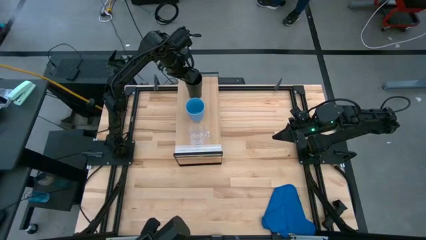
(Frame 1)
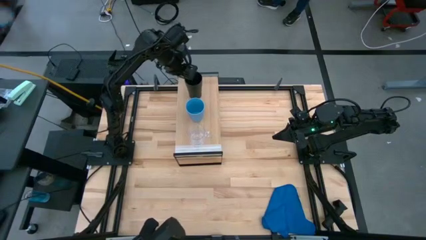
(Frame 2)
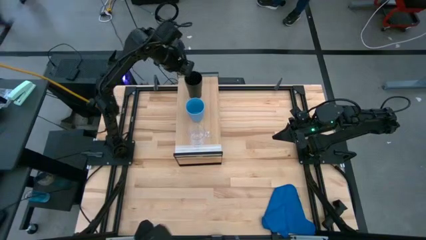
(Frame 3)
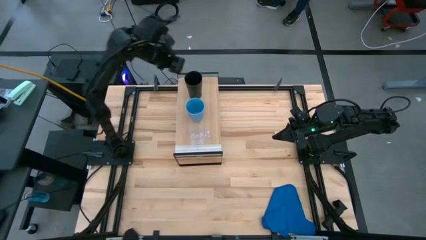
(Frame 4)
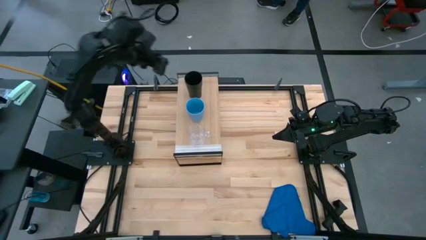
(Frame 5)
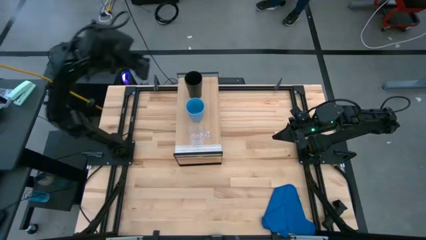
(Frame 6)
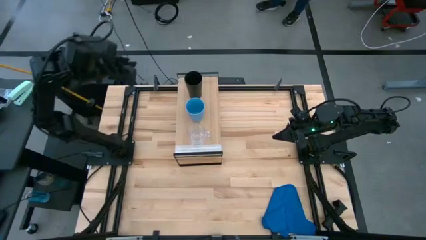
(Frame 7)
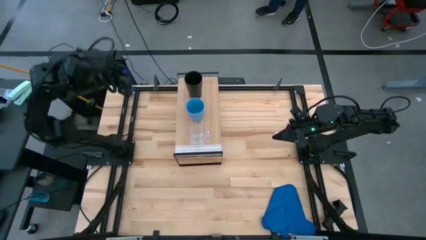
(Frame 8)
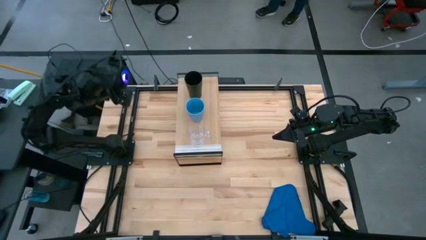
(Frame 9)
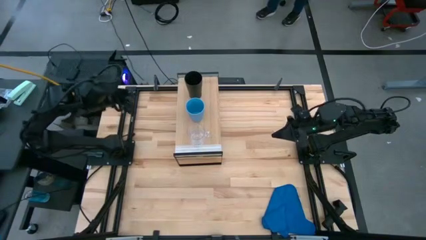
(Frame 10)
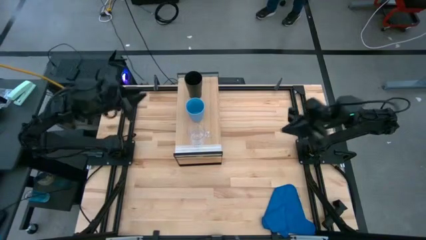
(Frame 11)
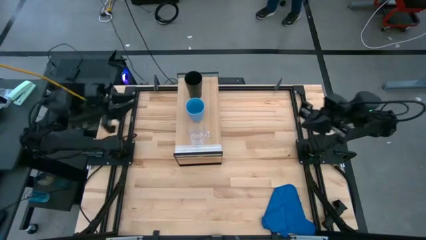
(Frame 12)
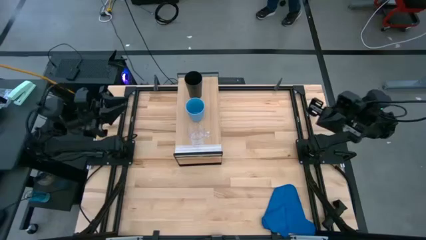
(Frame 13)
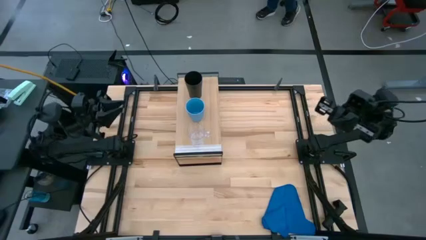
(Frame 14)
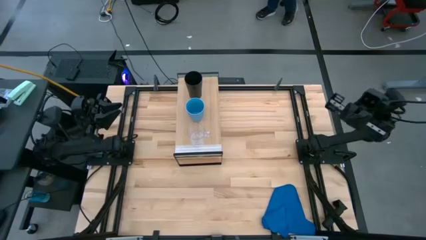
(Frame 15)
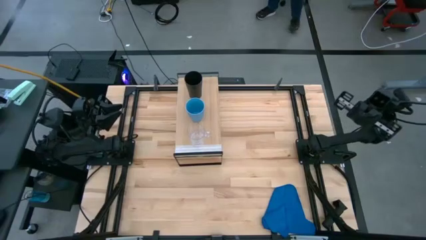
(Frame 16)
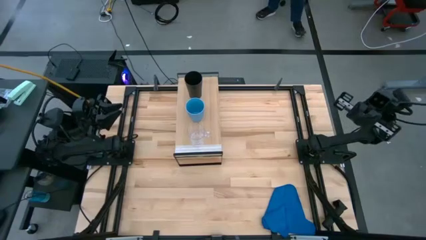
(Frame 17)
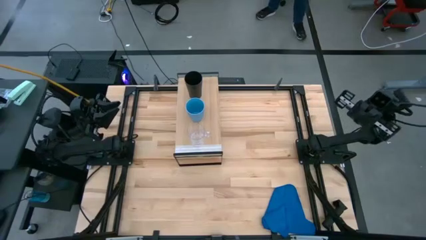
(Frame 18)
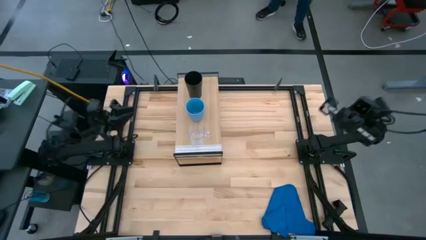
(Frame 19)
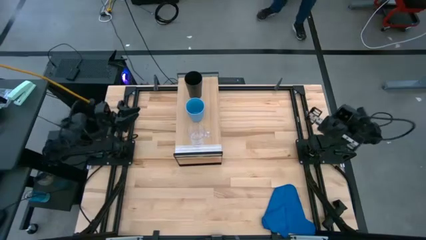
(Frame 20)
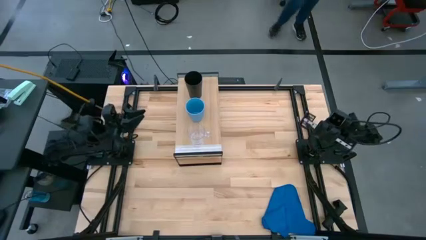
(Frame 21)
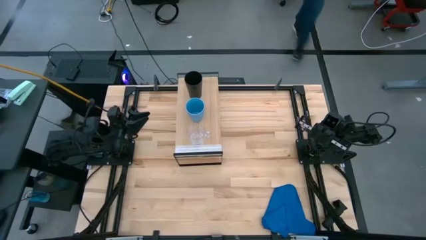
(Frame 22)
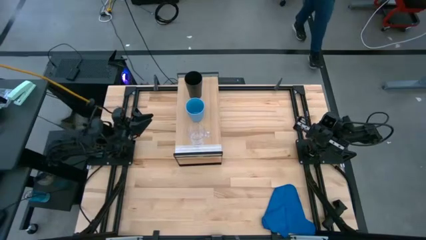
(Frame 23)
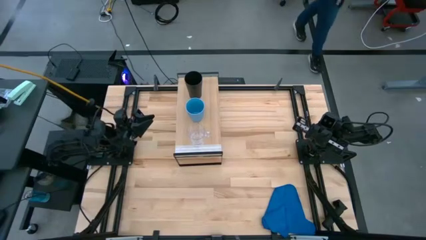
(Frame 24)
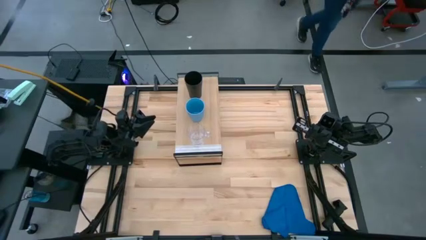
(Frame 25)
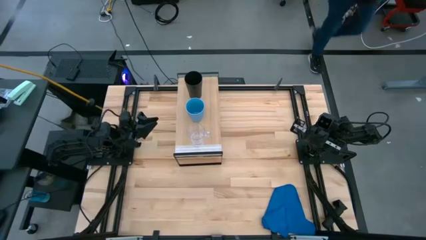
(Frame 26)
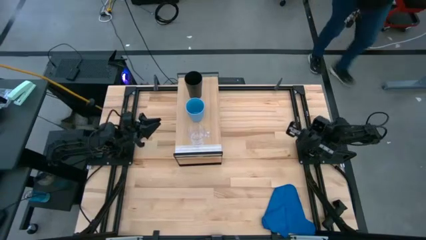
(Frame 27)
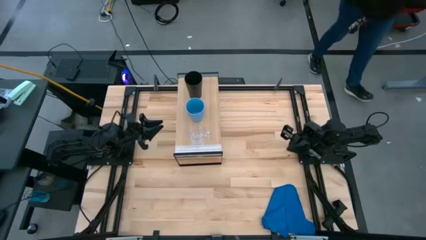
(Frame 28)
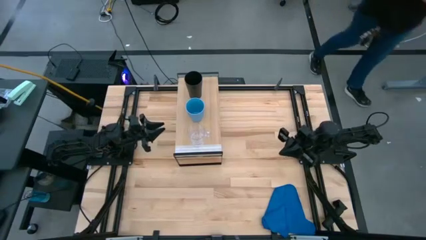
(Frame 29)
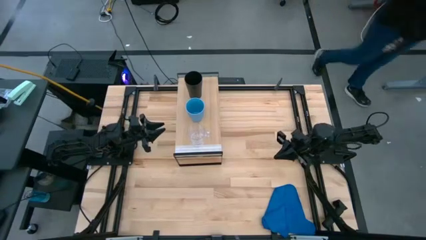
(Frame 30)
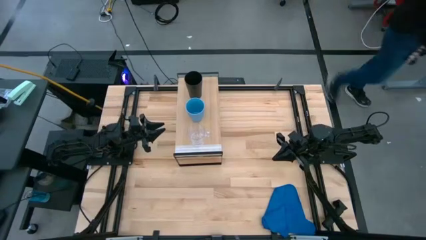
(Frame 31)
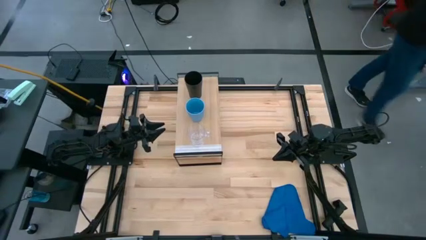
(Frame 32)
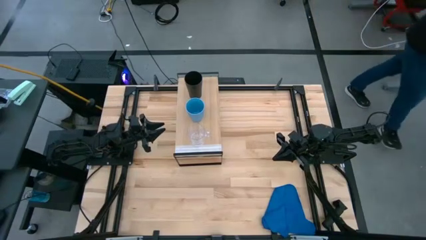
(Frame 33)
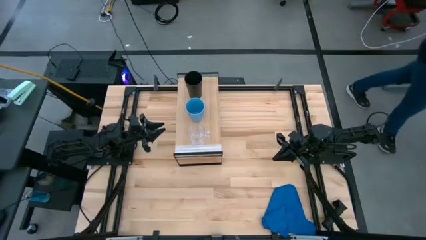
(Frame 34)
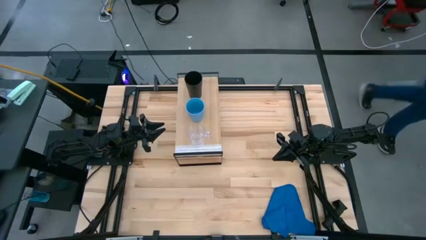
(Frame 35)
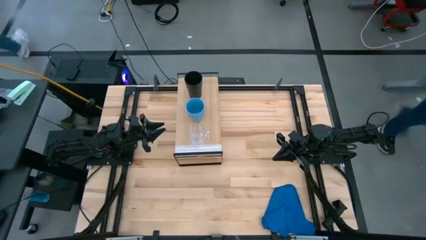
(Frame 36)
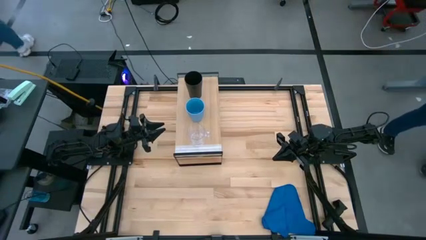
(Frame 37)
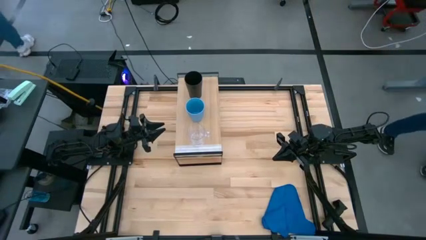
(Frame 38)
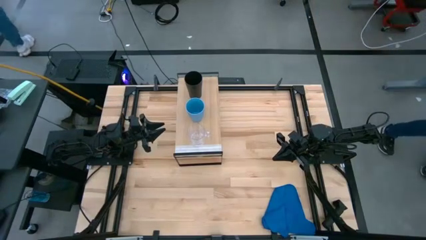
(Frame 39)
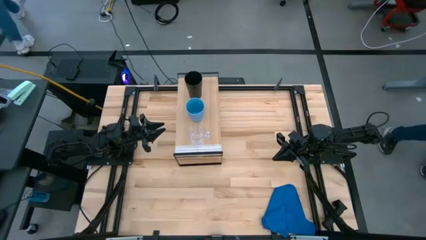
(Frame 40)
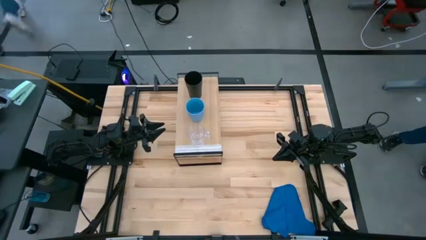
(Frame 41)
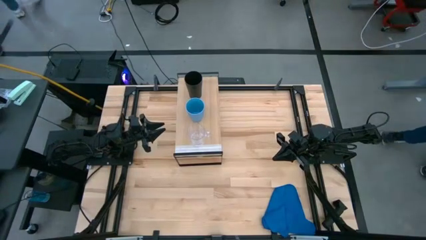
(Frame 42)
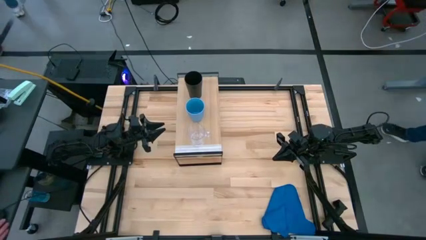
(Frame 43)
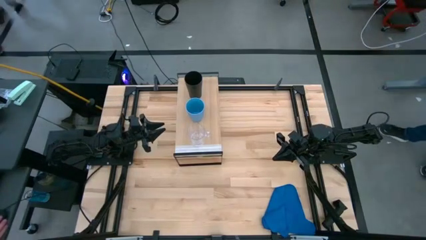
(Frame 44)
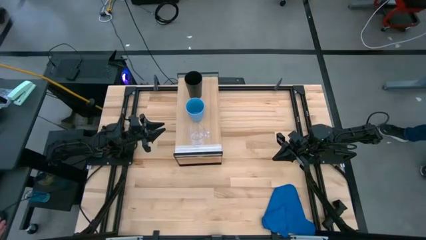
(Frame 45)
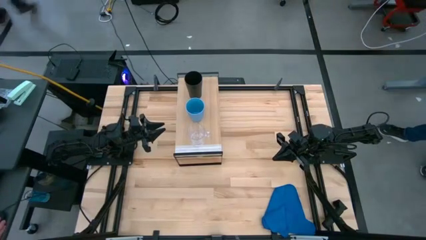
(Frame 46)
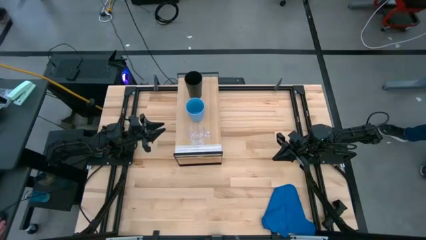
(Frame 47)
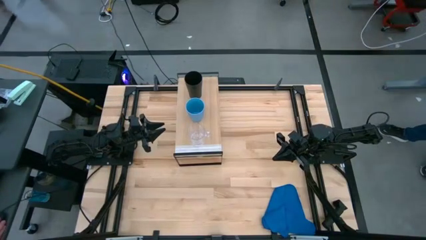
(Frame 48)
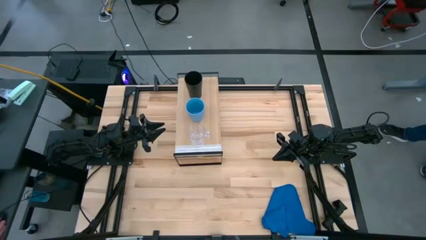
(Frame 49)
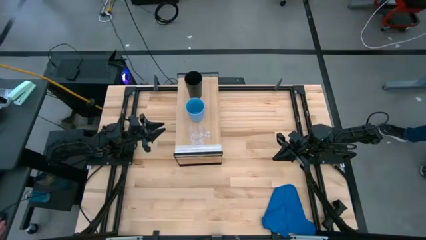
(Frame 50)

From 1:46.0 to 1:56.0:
Task: Stack small to large cups/mugs on shelf
Return to Home Position

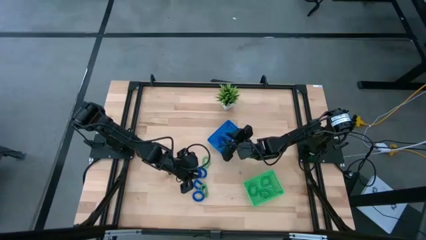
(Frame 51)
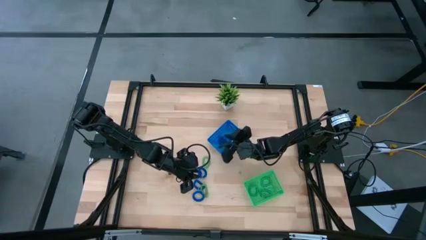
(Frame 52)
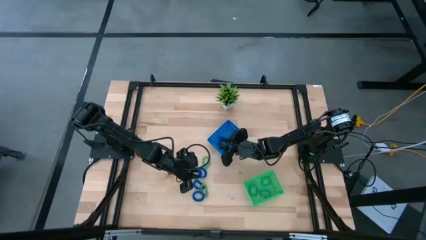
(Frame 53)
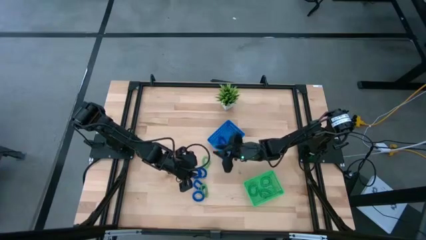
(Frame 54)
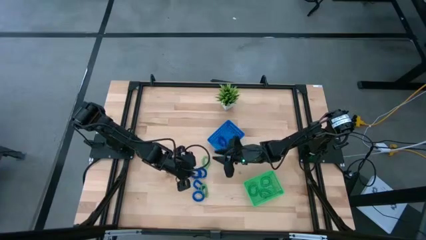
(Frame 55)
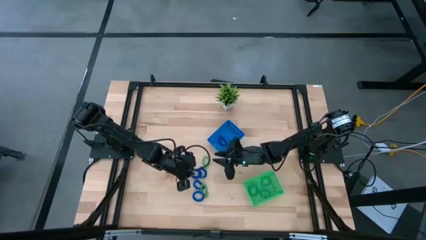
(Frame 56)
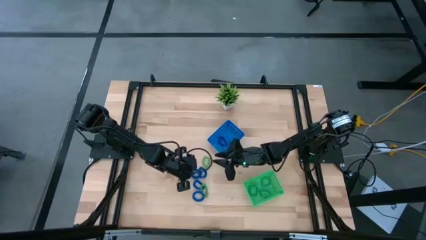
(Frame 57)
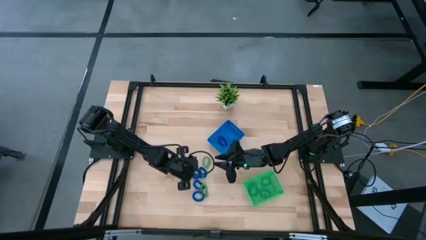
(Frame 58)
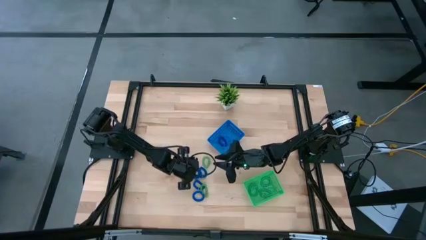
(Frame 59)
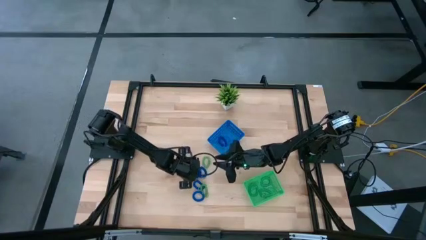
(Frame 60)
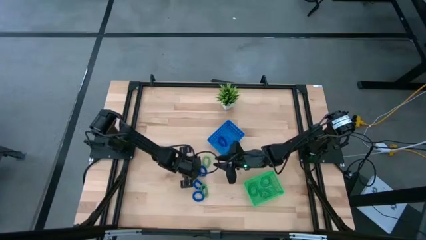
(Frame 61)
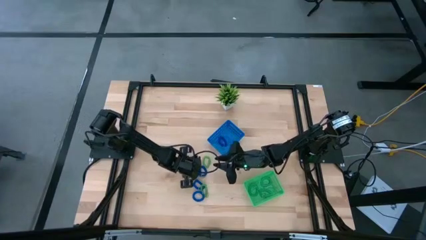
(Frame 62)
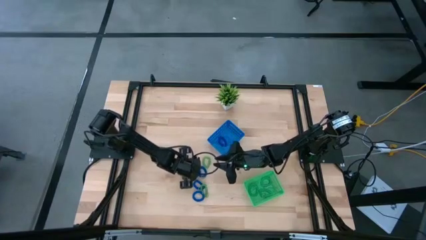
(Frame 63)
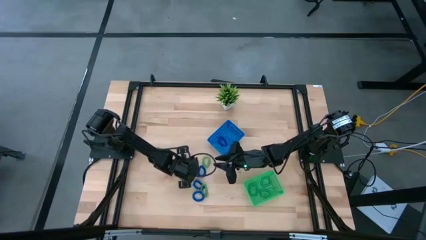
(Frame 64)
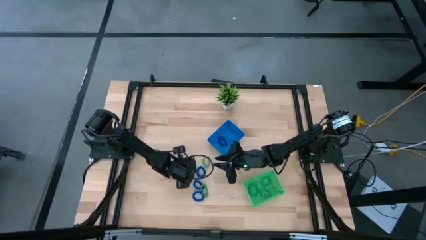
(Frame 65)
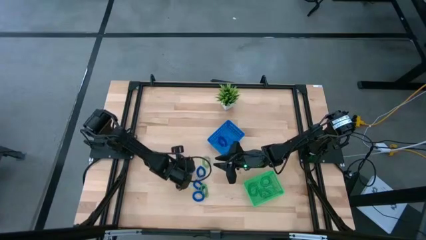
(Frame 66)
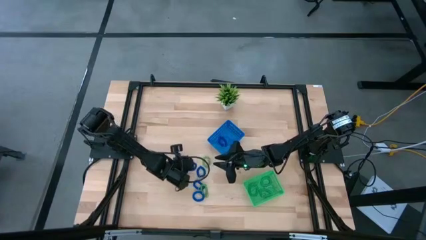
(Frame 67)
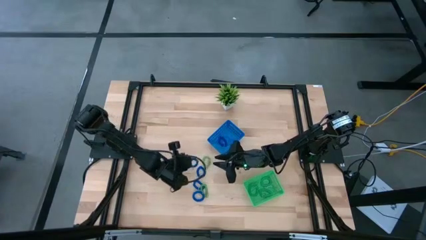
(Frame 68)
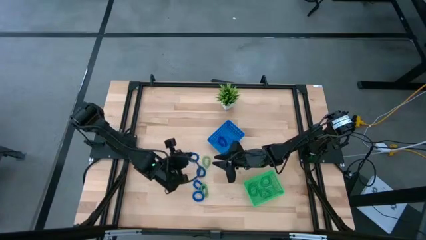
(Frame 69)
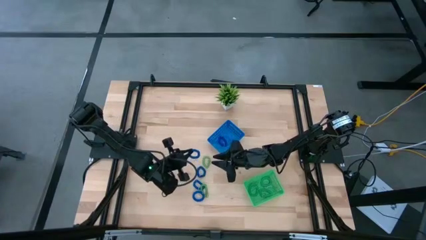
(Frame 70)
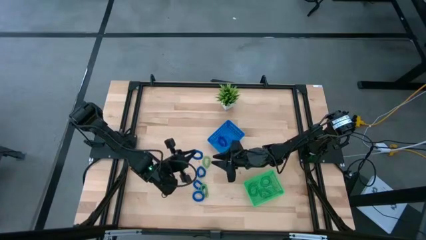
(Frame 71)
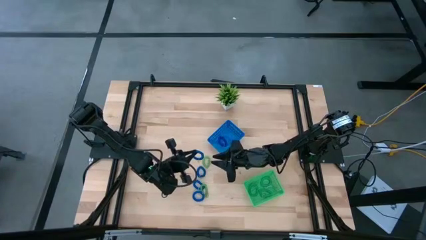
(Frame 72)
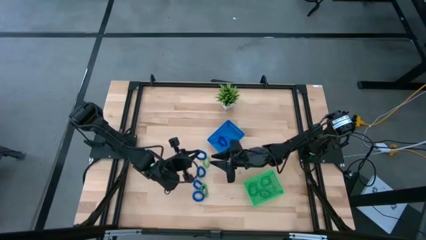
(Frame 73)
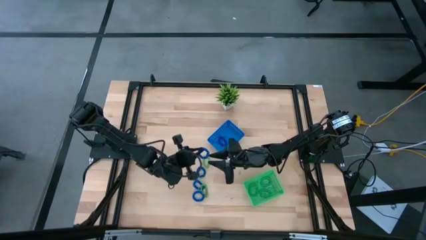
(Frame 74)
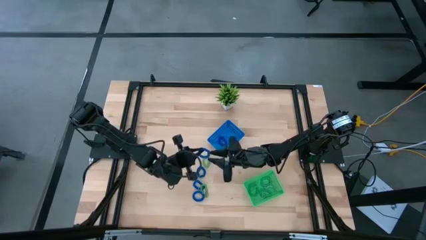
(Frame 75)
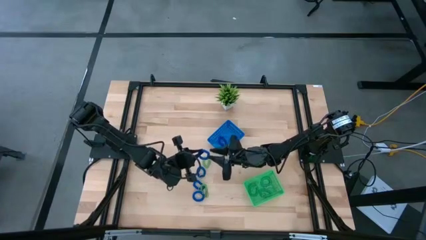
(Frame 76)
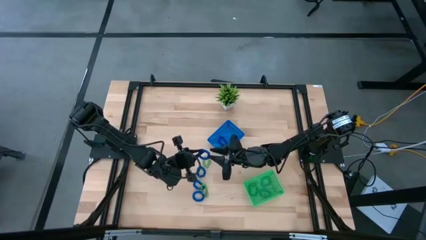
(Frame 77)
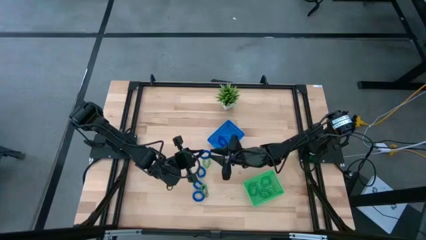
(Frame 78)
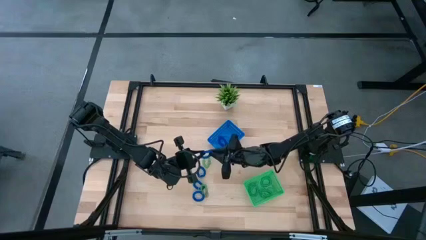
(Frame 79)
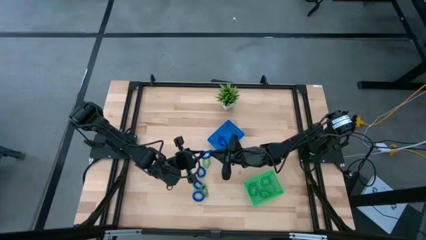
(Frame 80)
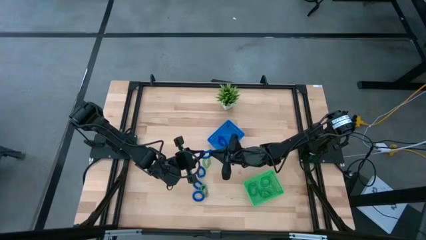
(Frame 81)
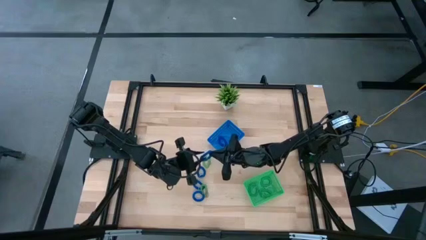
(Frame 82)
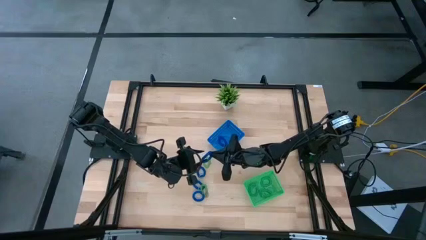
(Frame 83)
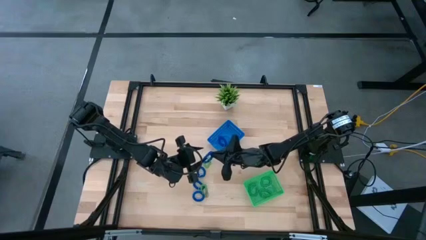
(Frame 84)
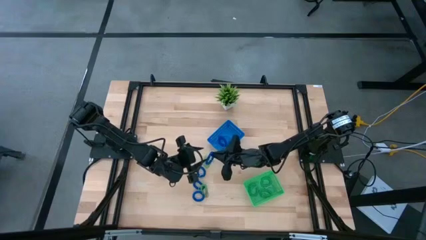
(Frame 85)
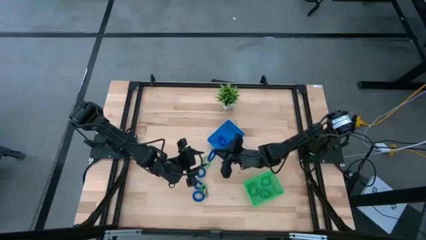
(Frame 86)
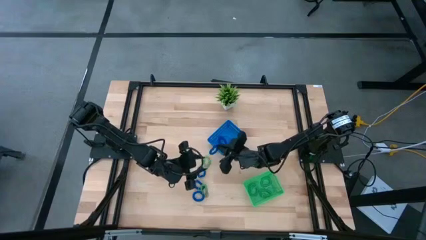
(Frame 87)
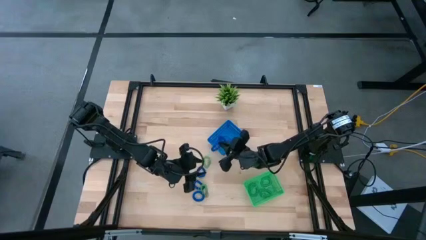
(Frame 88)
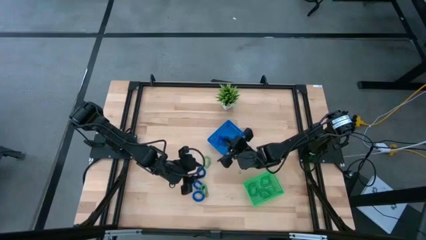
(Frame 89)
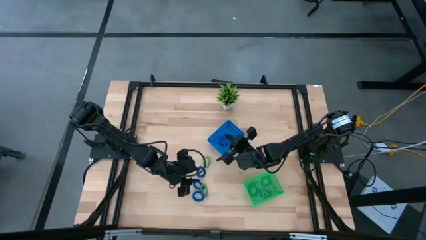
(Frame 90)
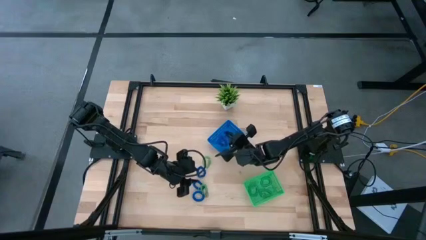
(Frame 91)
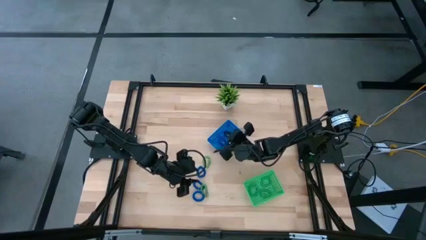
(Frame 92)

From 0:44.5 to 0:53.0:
Task: Sort spring keychains
Put the blue spring keychain into the blue bin
